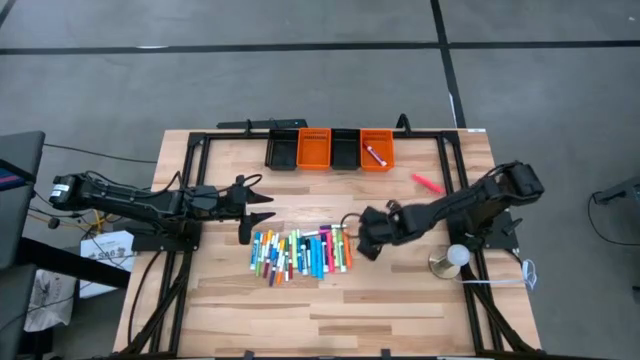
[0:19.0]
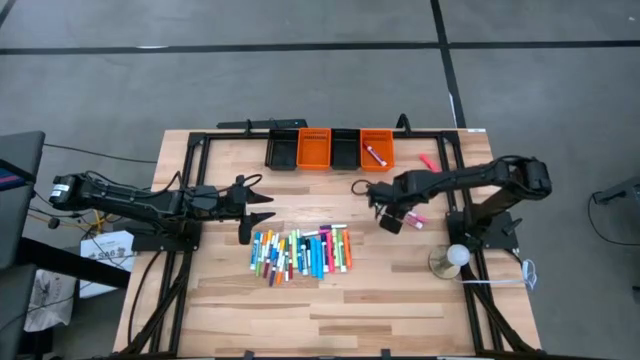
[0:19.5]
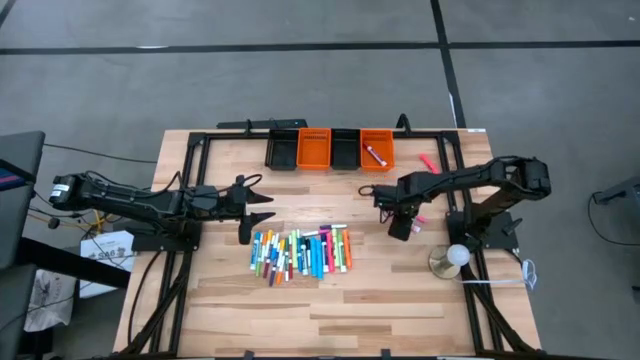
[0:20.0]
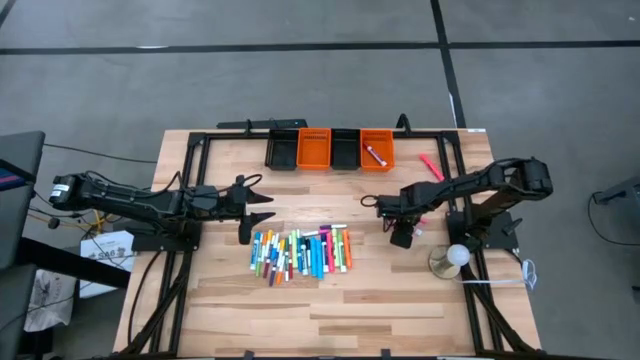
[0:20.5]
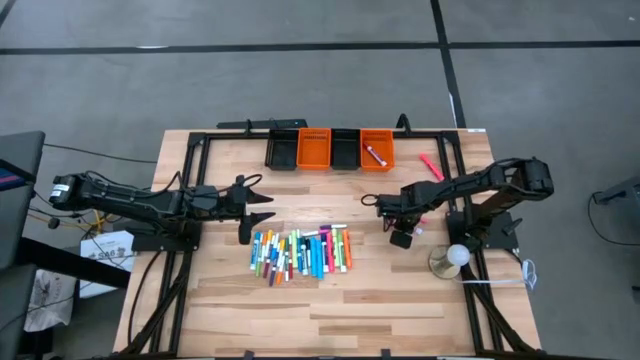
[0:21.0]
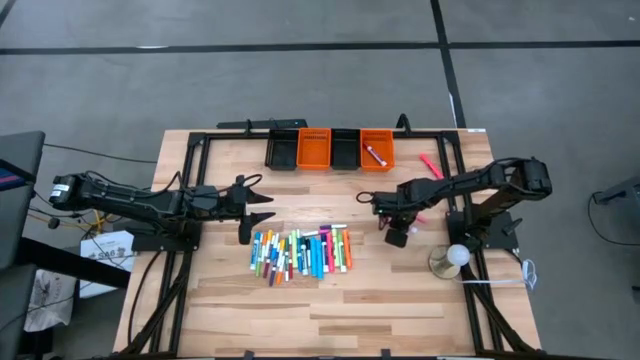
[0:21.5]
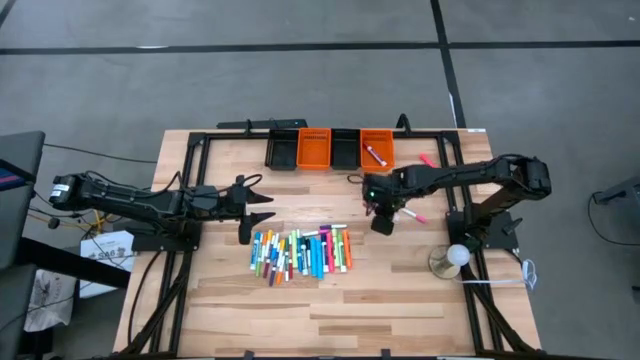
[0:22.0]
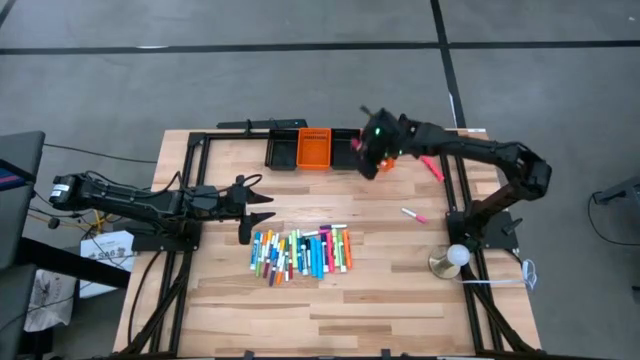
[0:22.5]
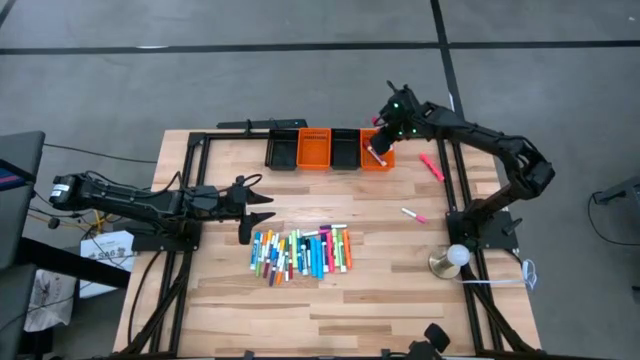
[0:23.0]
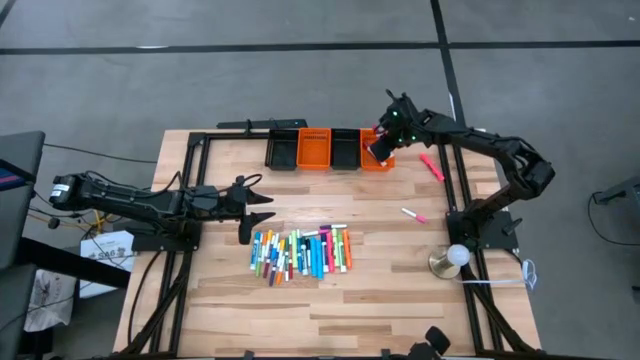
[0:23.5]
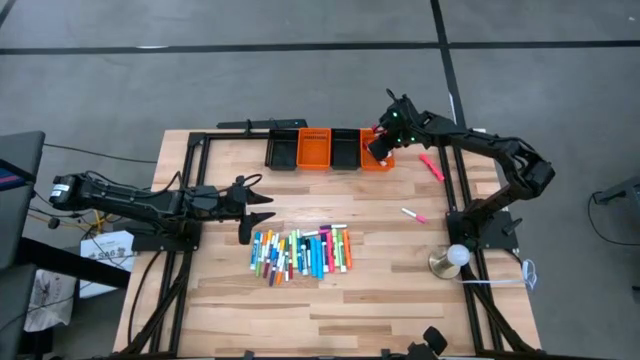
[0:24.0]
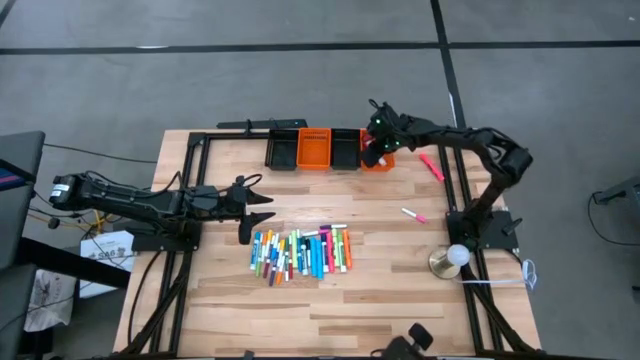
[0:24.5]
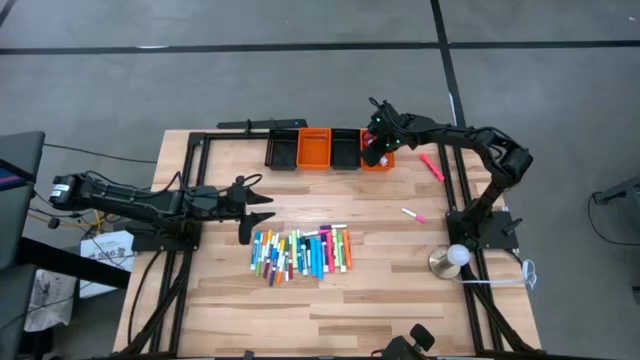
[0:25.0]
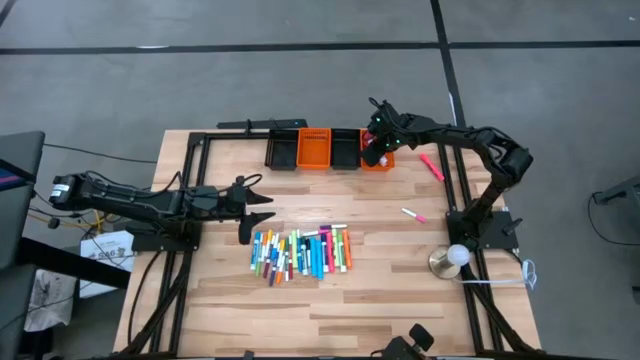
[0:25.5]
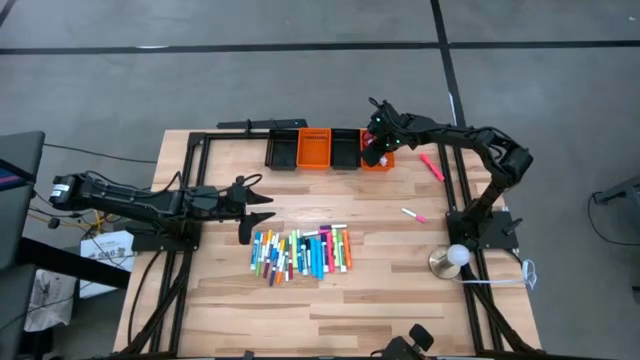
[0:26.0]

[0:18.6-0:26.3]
Task: Pick & Place Markers
Put the pink marker pen into the right orange bin

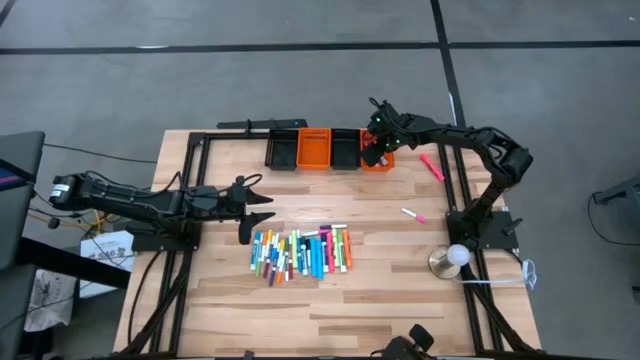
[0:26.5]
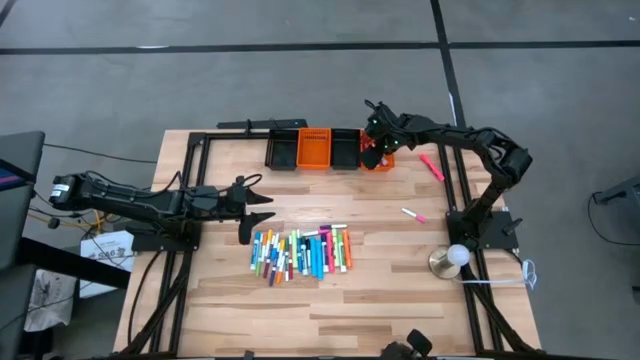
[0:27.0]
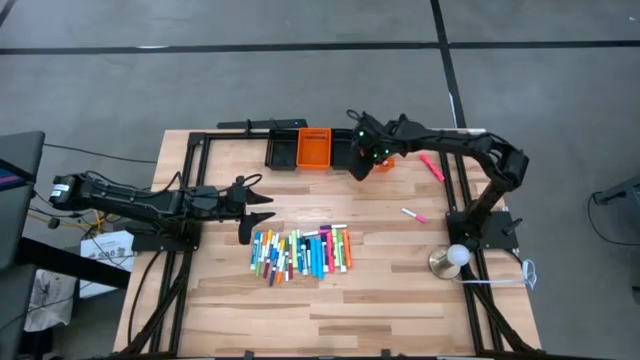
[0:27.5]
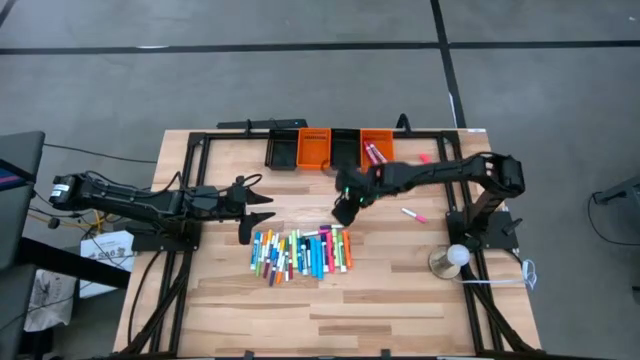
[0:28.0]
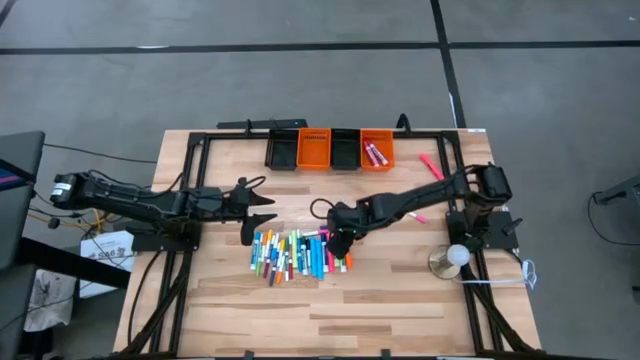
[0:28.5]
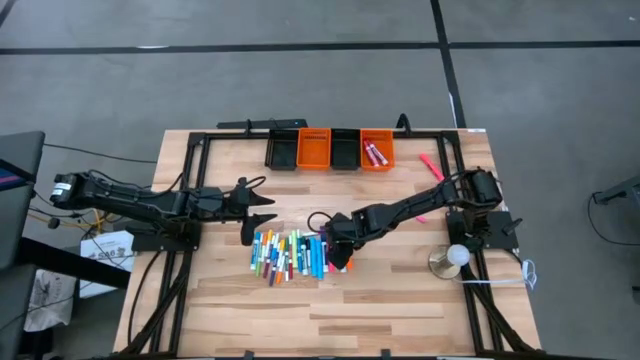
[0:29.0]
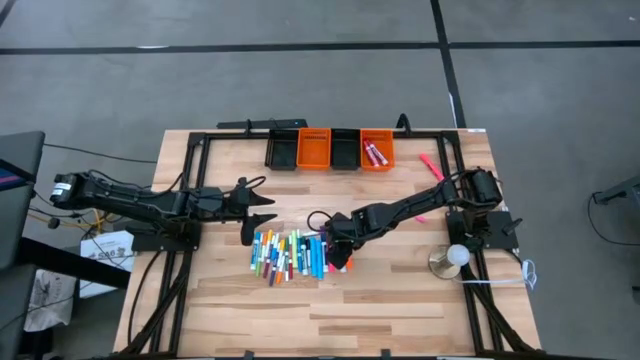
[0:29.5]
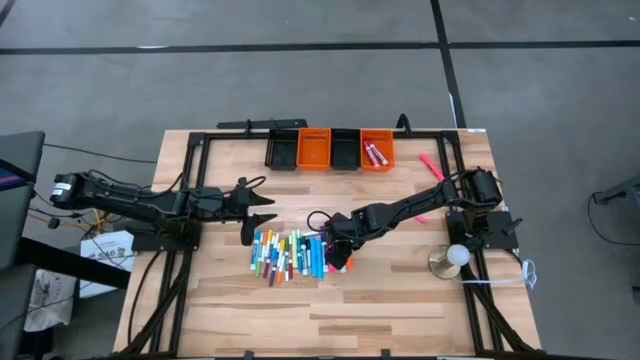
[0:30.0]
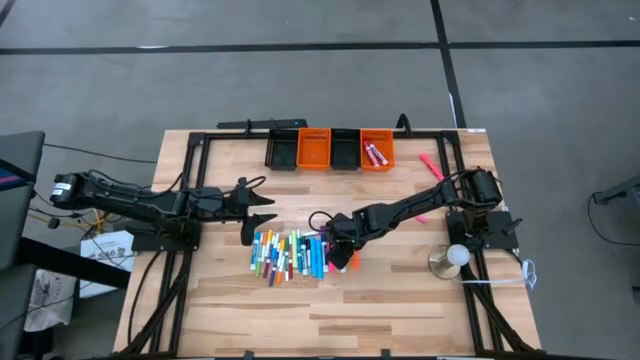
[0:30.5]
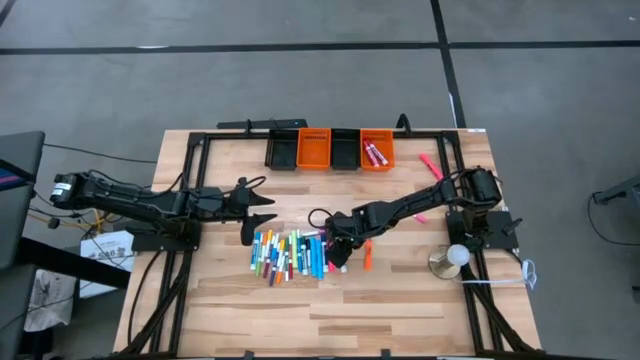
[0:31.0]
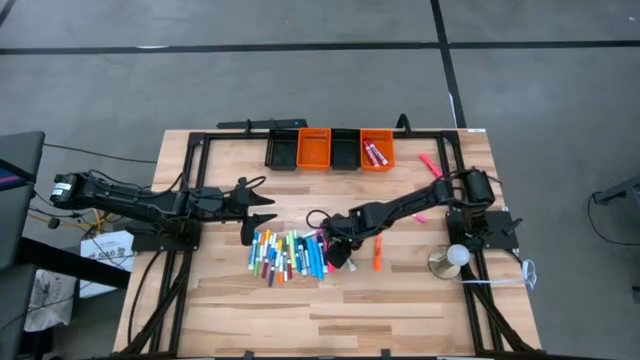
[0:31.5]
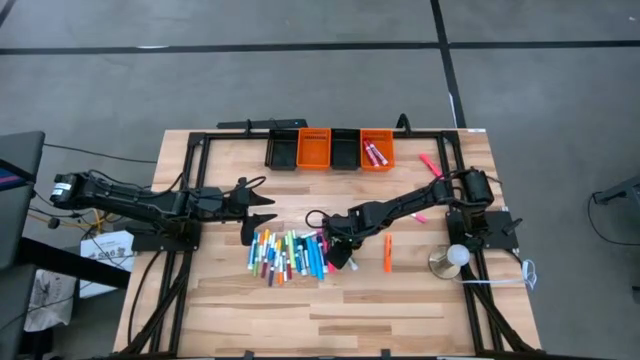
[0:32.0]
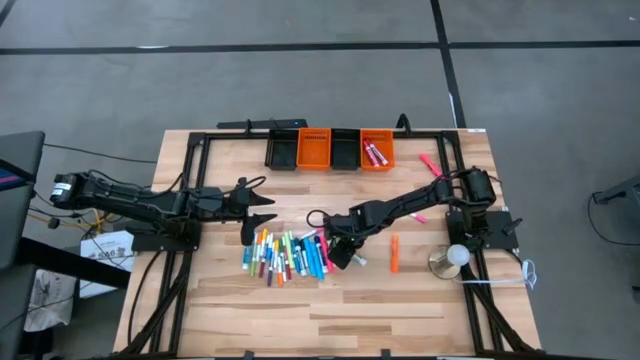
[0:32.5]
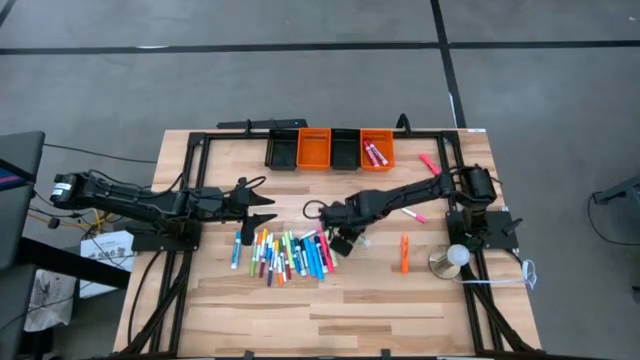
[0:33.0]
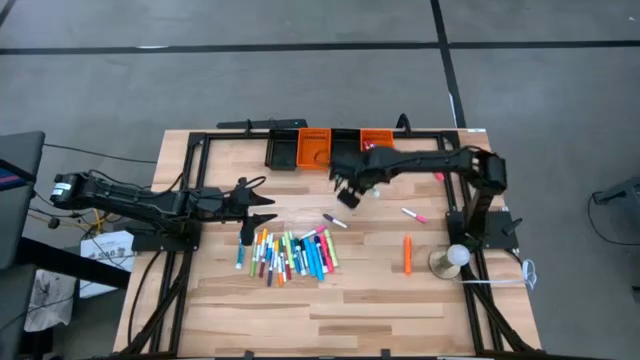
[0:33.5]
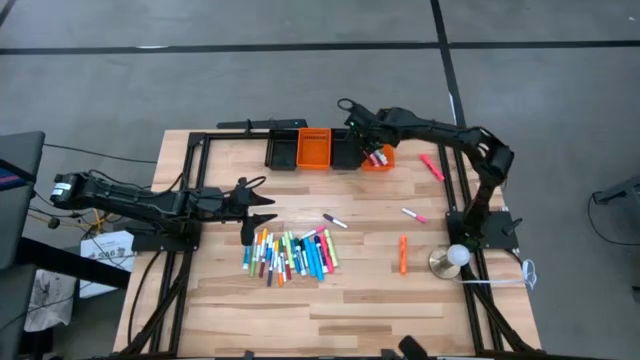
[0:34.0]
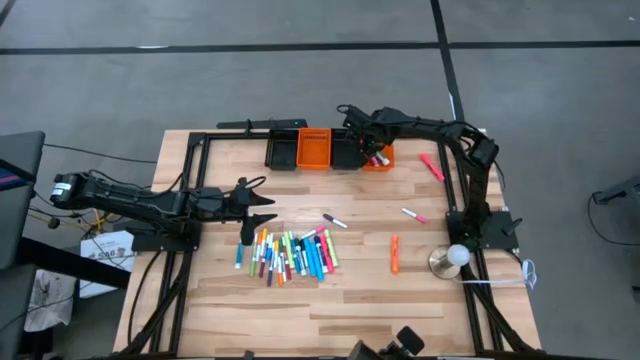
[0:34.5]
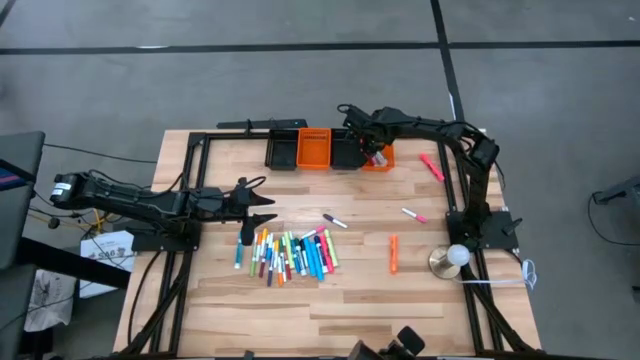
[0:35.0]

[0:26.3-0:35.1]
Put the light green marker pen into the right orange bin

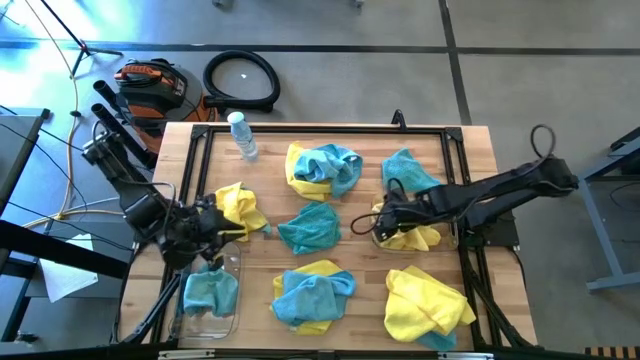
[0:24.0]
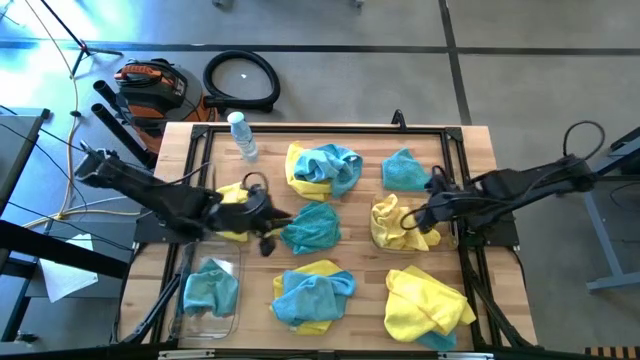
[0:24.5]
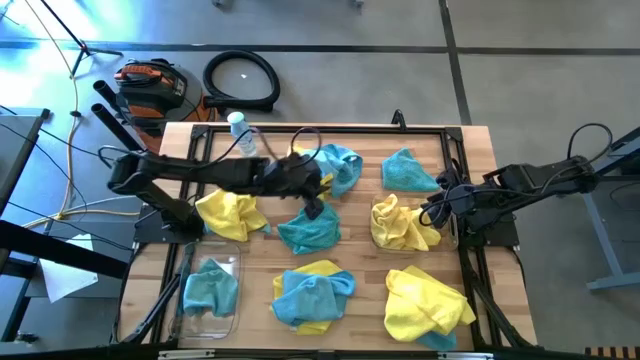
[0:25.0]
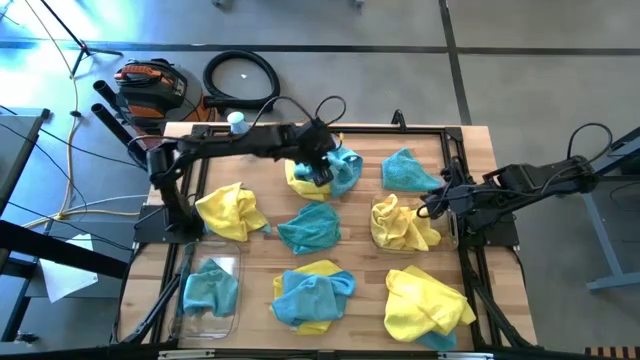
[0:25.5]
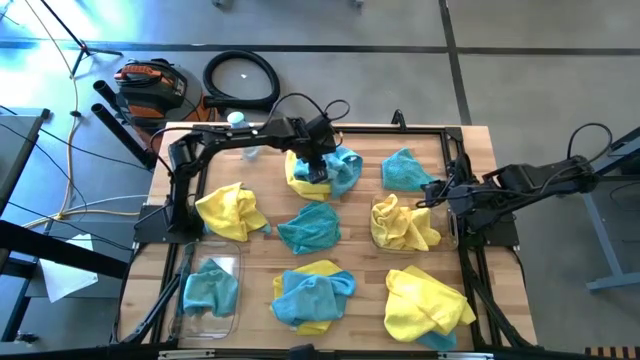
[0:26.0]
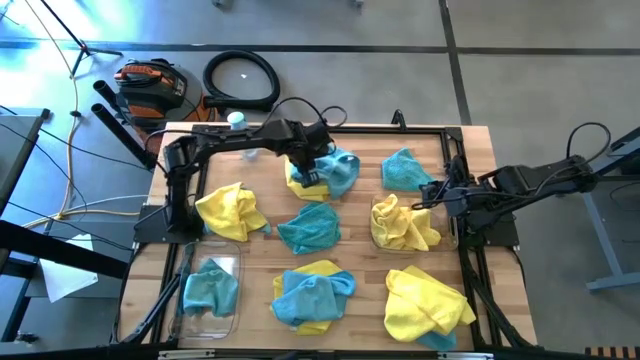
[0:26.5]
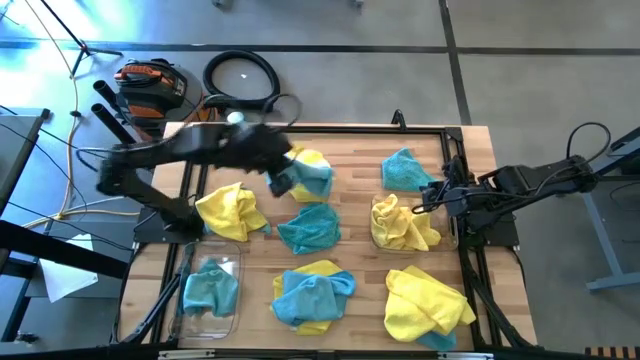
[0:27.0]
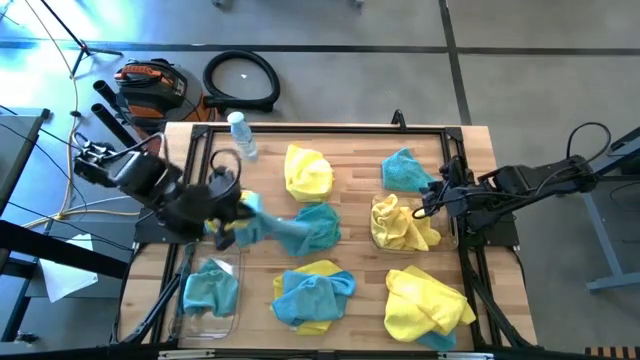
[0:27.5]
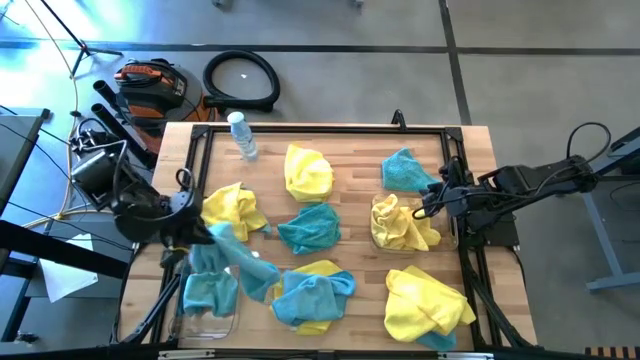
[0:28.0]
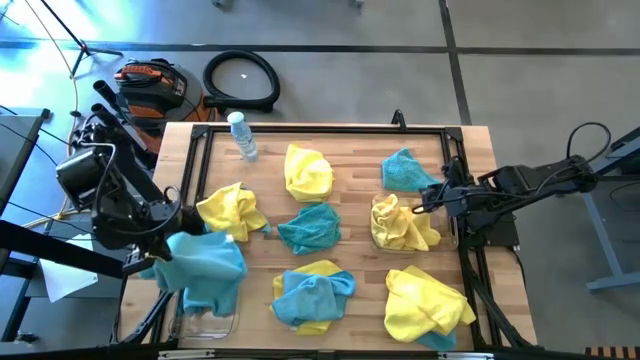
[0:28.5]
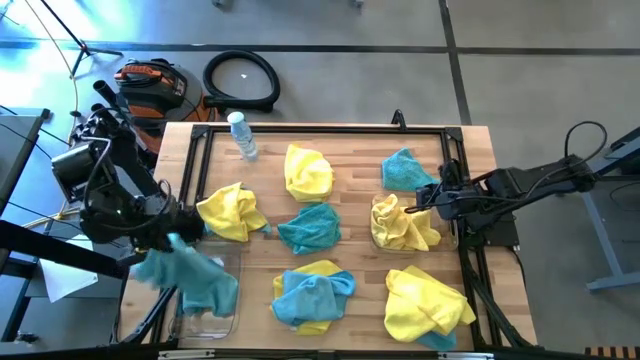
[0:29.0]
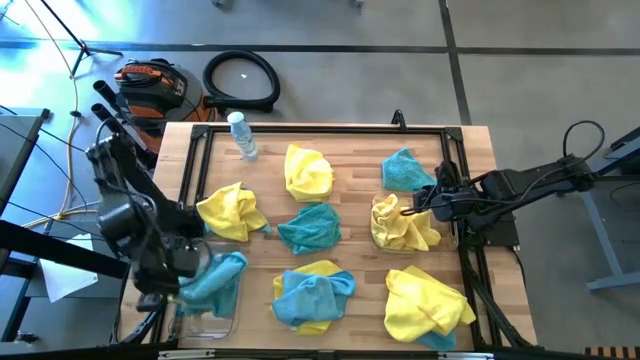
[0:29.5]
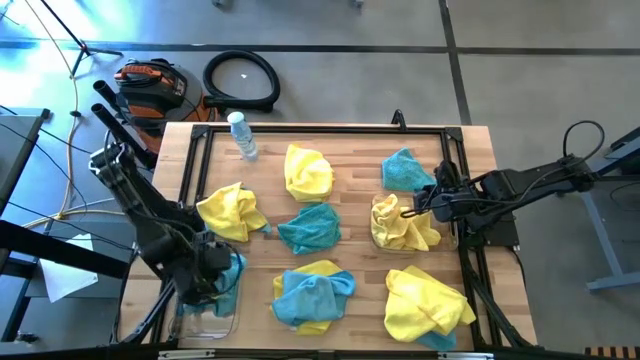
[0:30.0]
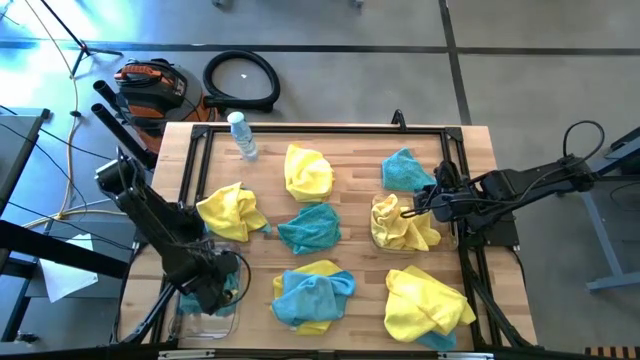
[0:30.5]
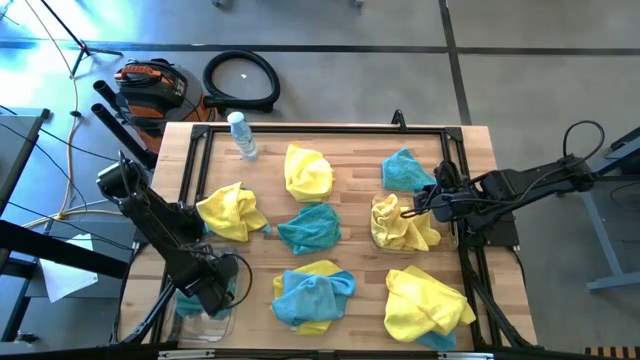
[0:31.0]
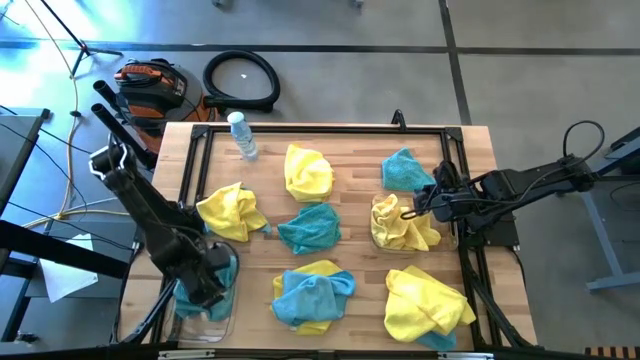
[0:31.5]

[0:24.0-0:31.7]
Task: Sort microfiber towel by color & place in baskets
Put the blue microfiber towel into the left transparent bin
